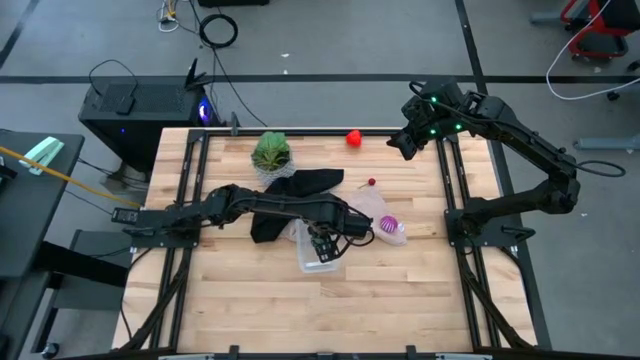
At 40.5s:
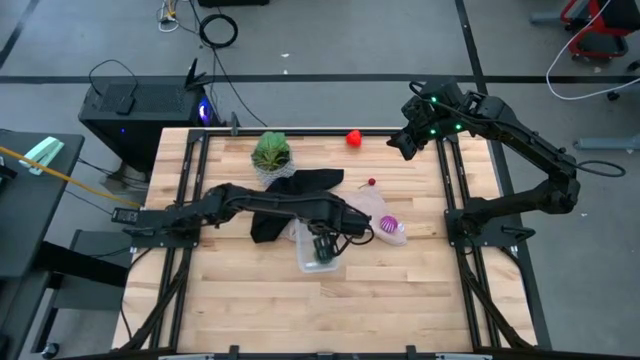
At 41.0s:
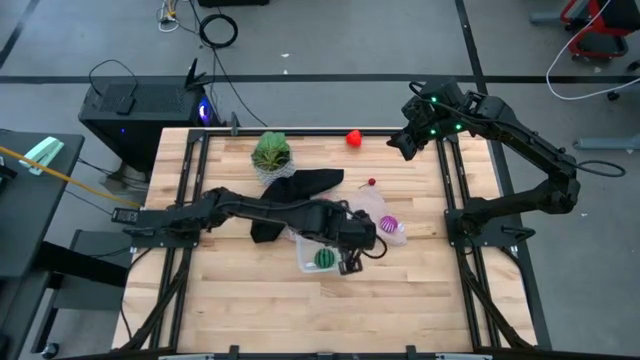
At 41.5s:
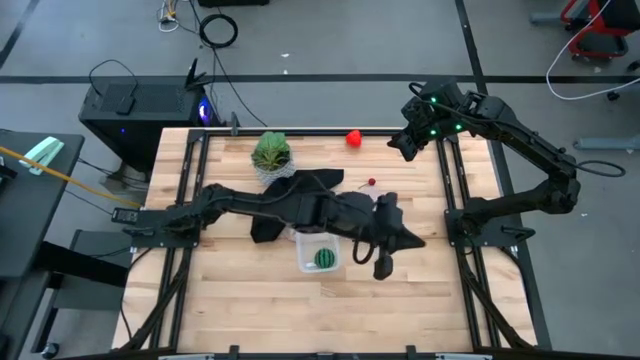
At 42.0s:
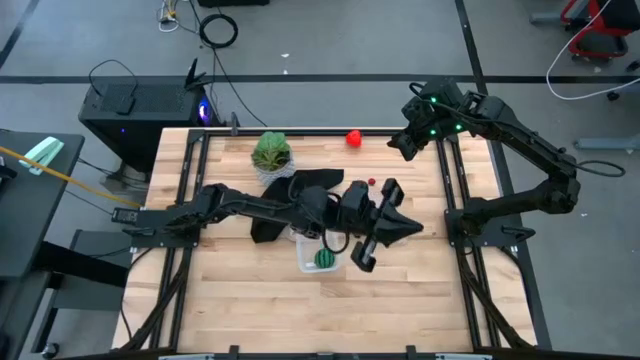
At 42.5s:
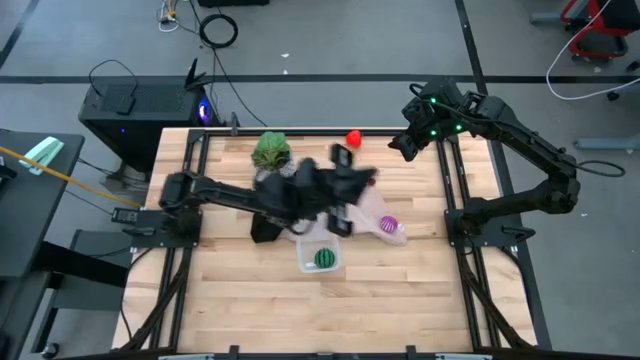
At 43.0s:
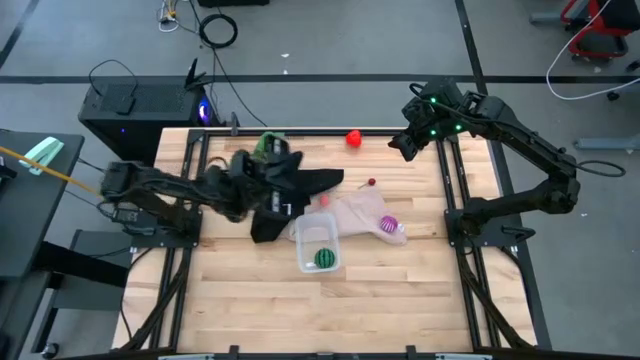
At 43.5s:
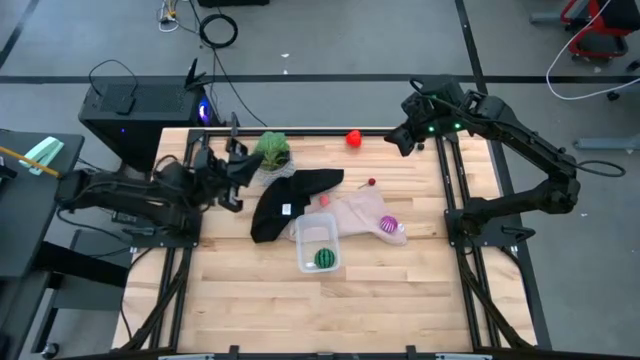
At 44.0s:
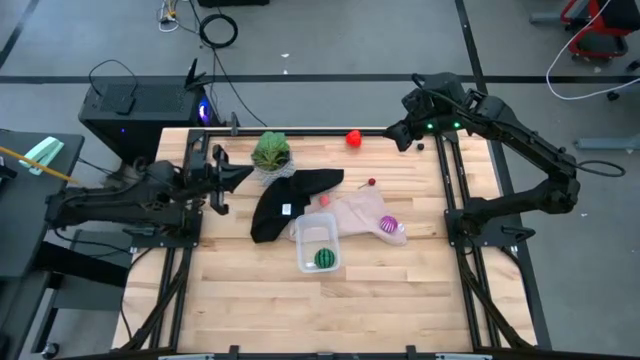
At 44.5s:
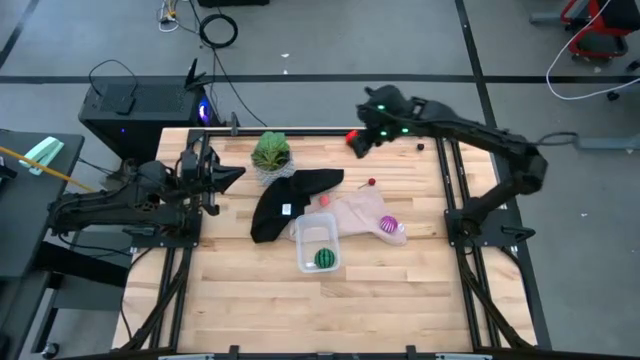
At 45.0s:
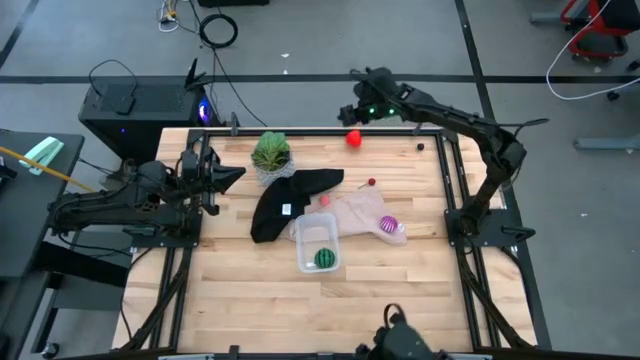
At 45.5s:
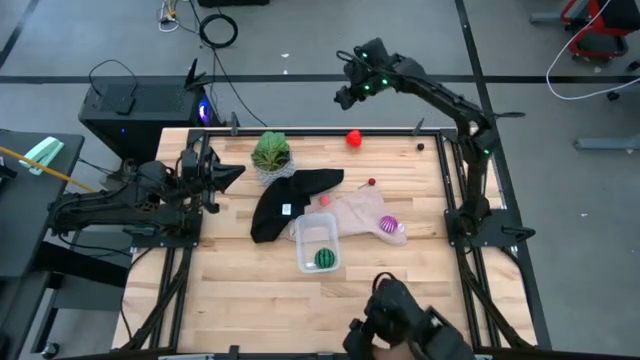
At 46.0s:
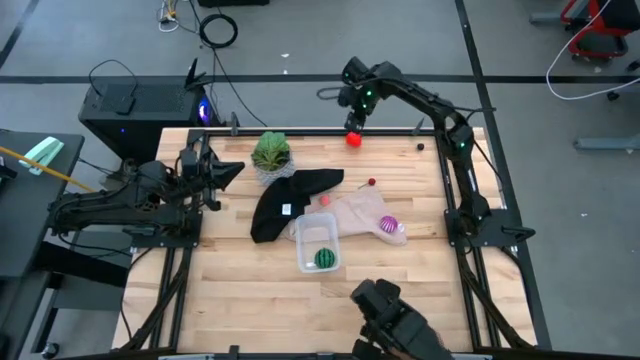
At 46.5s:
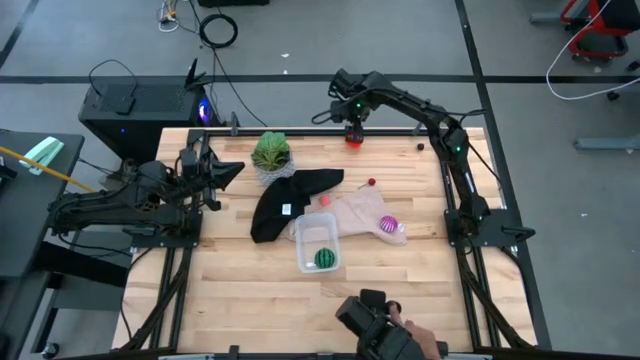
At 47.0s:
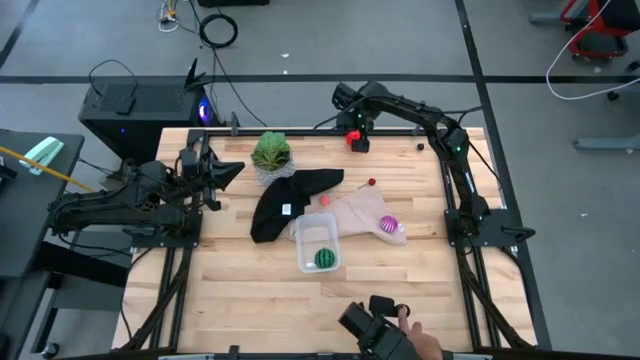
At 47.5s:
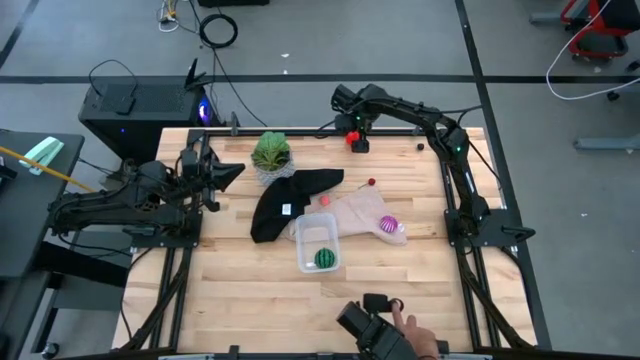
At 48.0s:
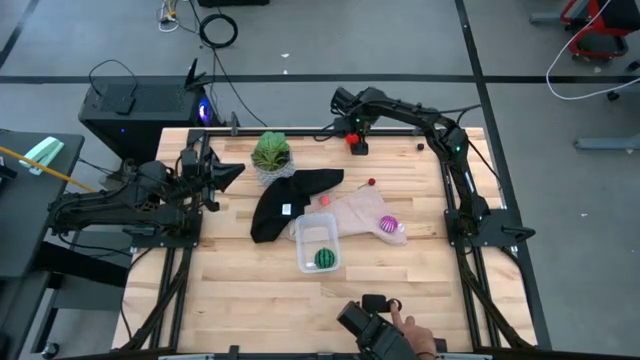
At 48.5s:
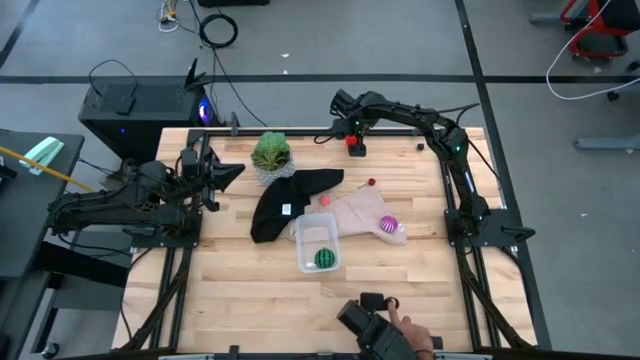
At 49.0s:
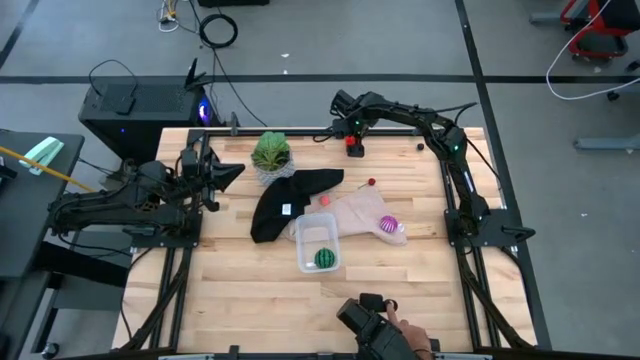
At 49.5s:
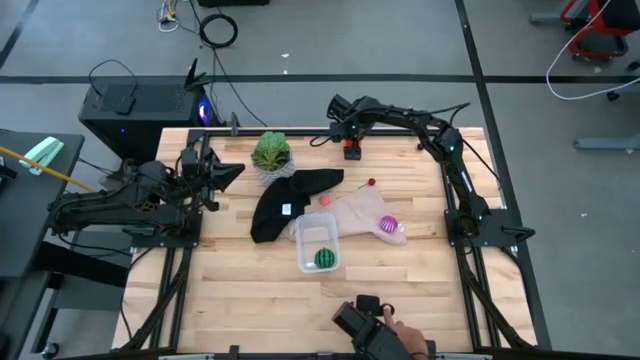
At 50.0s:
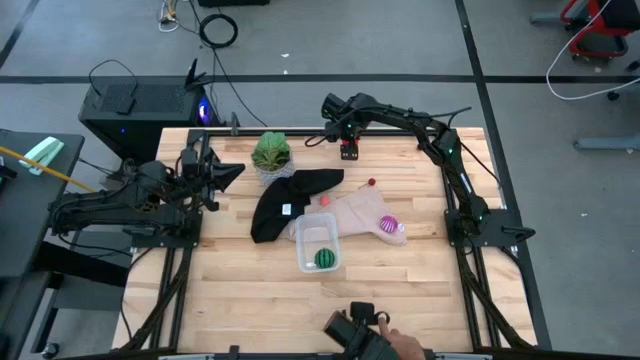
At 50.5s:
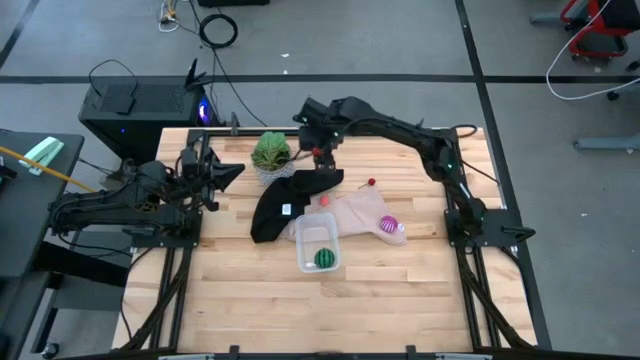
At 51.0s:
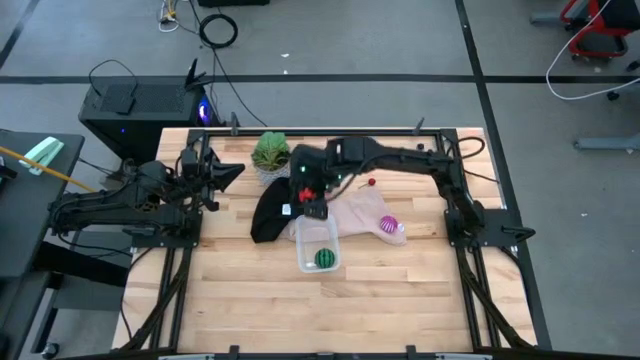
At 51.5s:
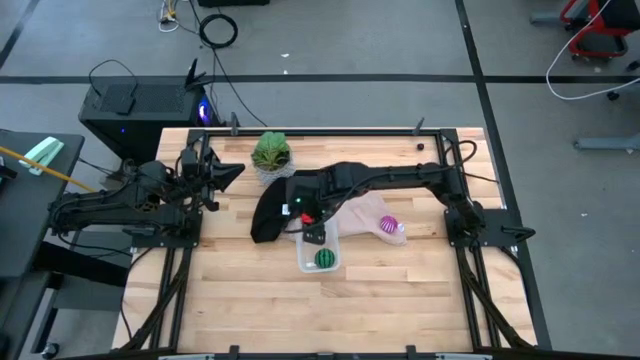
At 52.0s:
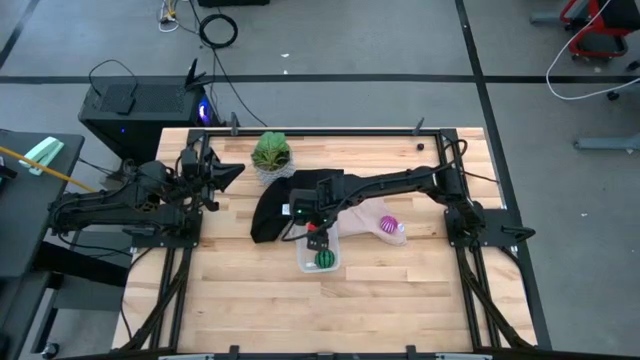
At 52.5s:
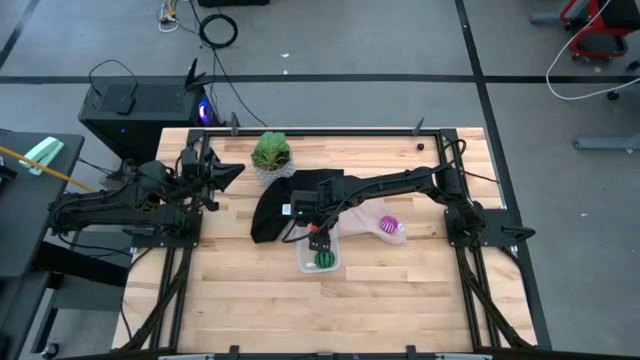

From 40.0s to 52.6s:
Task: Pick and placing Produce into tupperware
Put apple into the transparent container

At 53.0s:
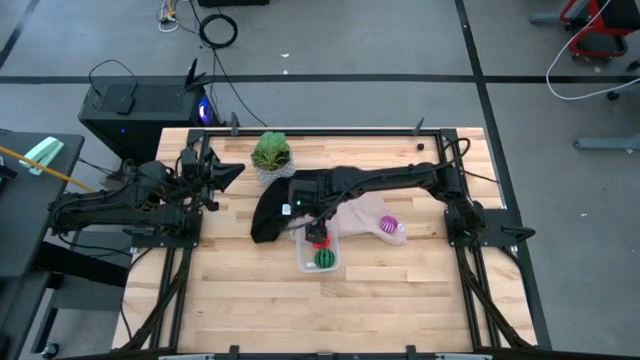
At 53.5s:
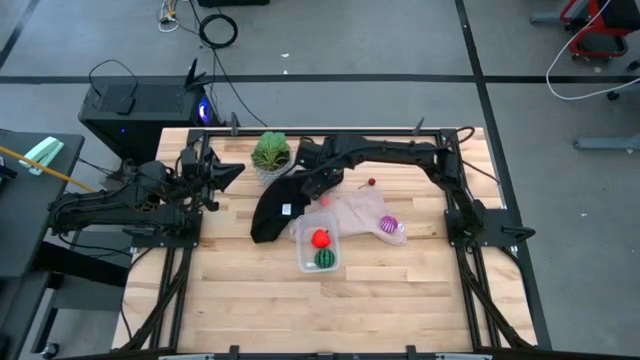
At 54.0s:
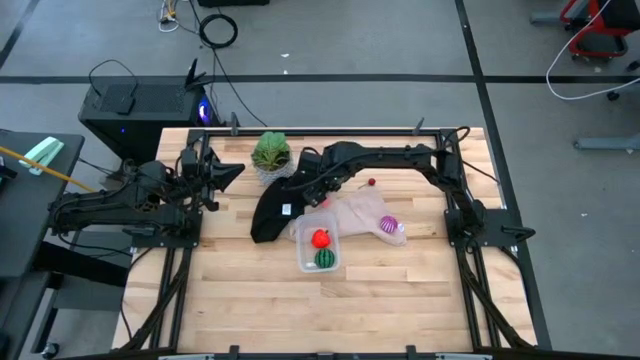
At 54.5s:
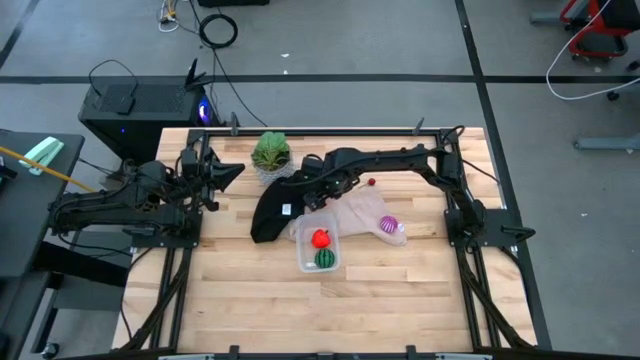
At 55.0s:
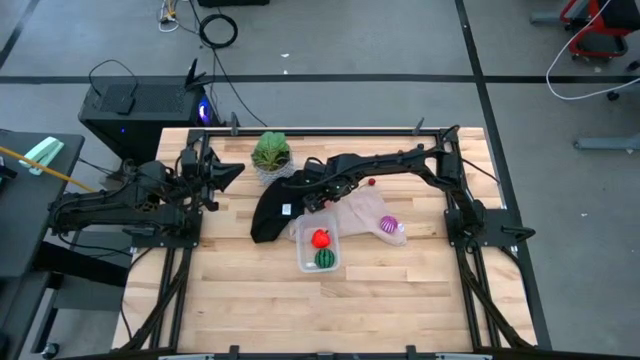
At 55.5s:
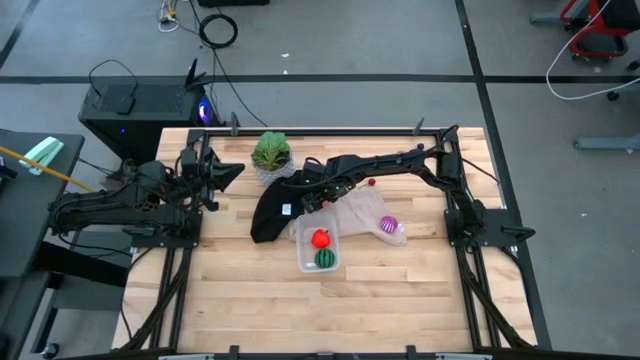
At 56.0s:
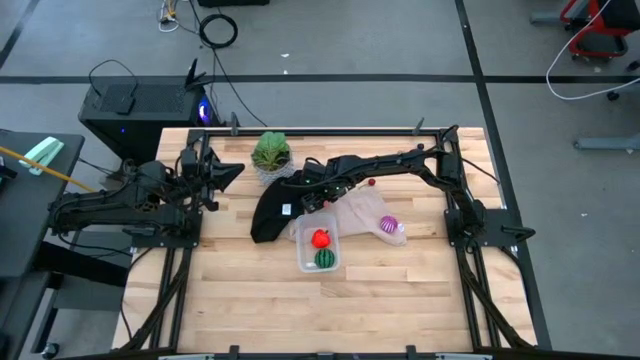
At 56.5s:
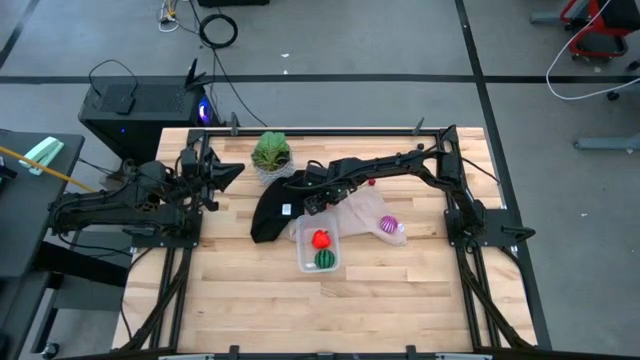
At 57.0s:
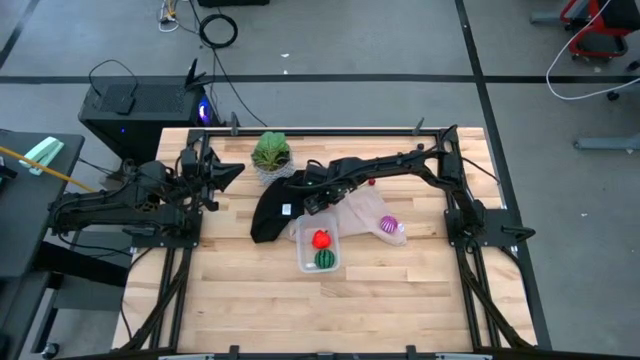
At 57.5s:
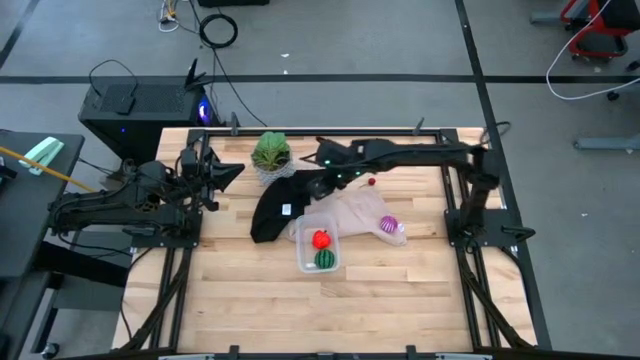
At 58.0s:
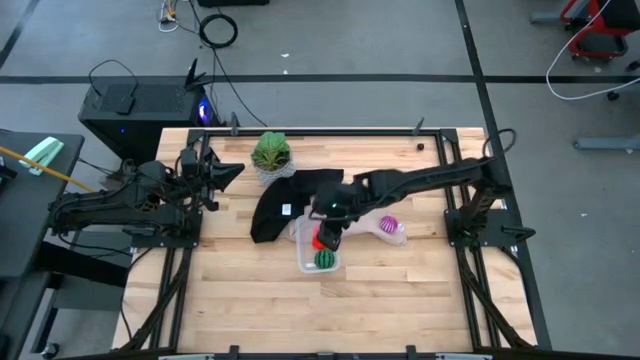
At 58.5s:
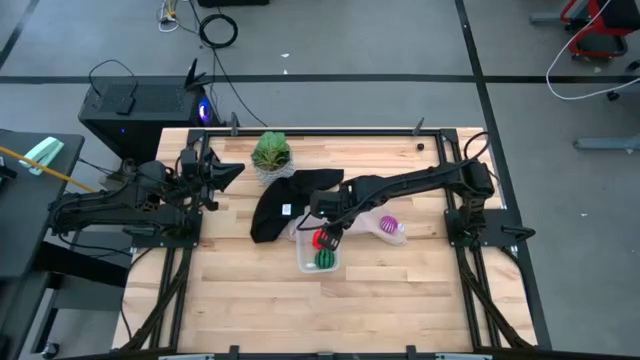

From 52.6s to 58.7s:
Put apricot into the transparent container

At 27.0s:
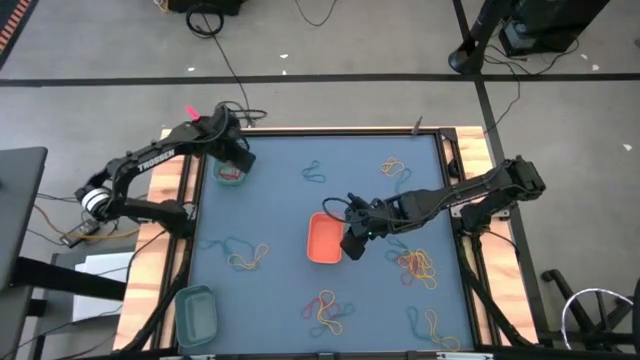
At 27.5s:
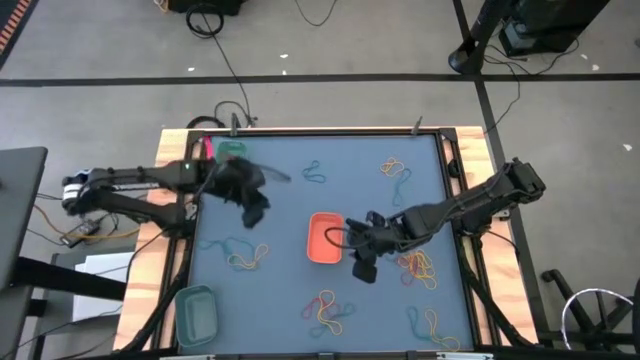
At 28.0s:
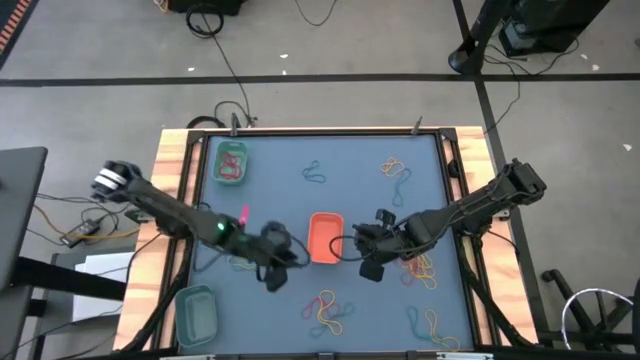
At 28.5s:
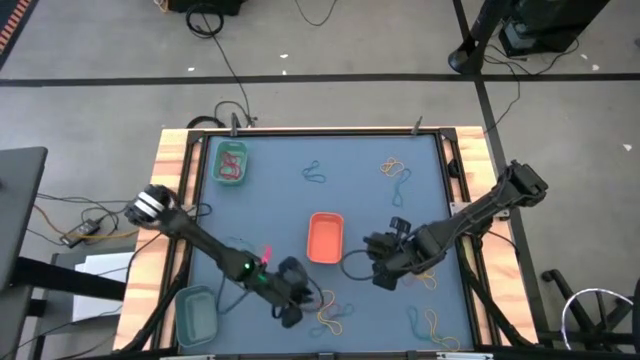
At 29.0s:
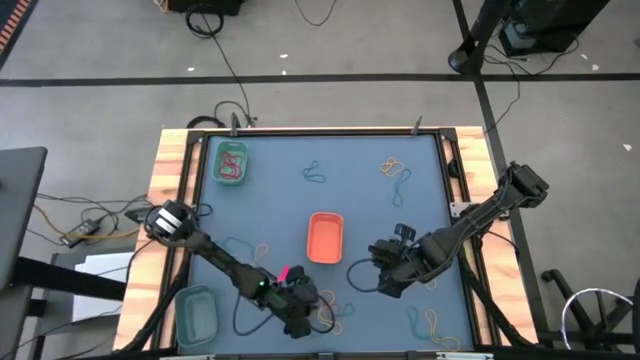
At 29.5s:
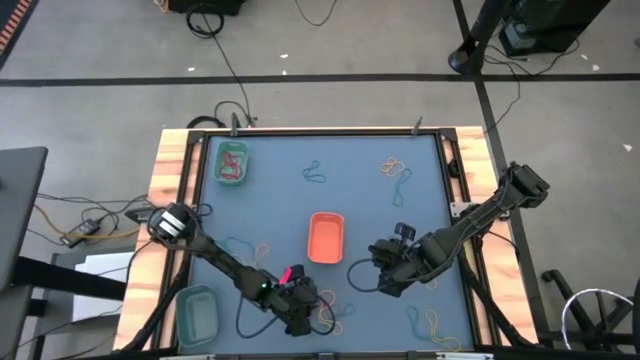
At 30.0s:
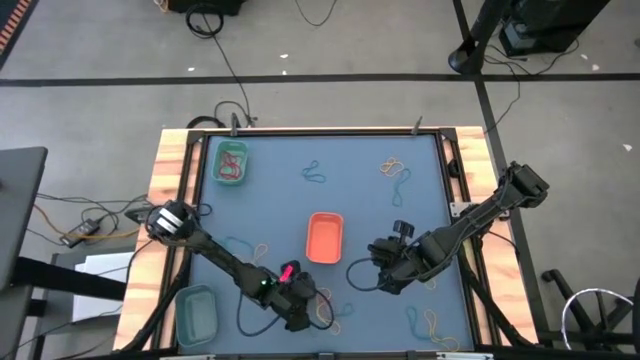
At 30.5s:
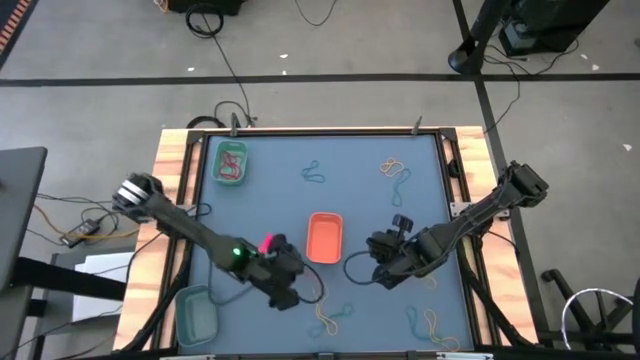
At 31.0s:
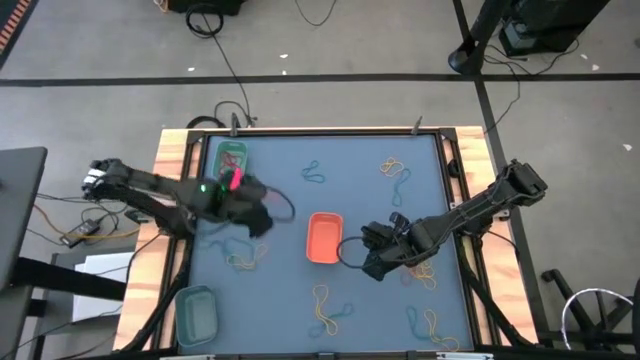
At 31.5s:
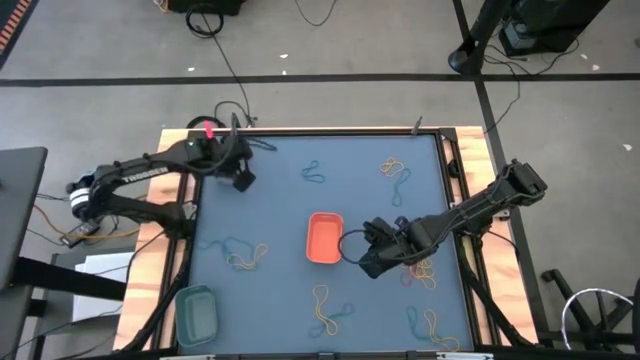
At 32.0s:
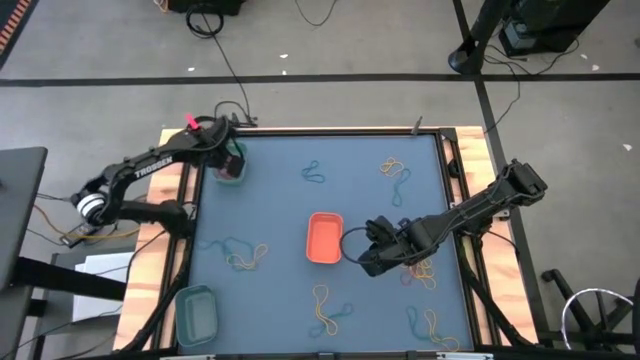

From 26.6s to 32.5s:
Task: Sort rubber bands into baskets
Put the red rubber band into the green bin
